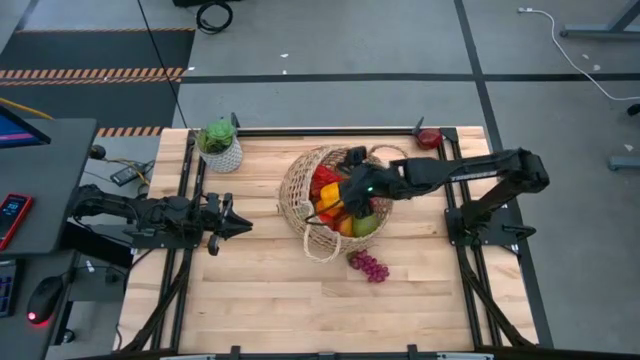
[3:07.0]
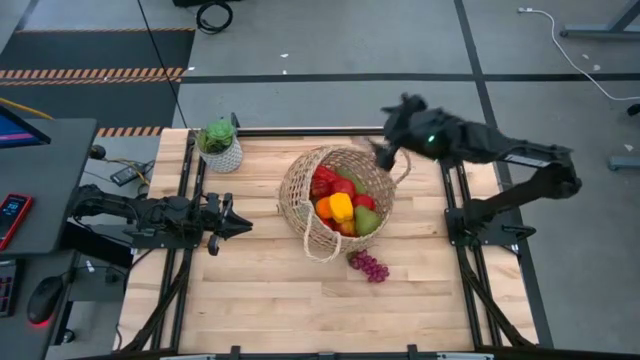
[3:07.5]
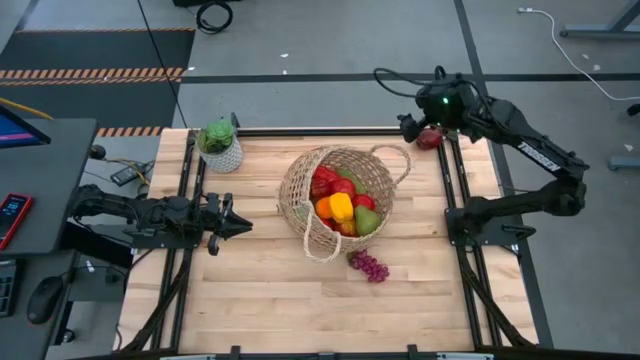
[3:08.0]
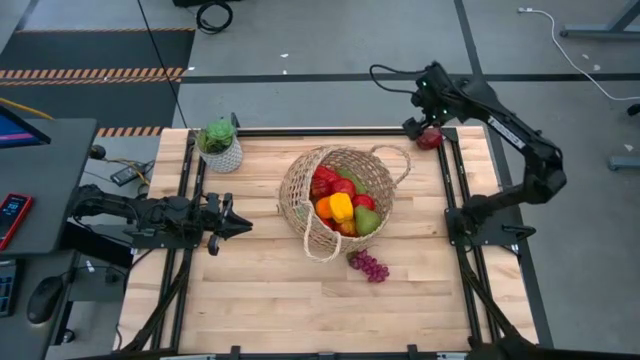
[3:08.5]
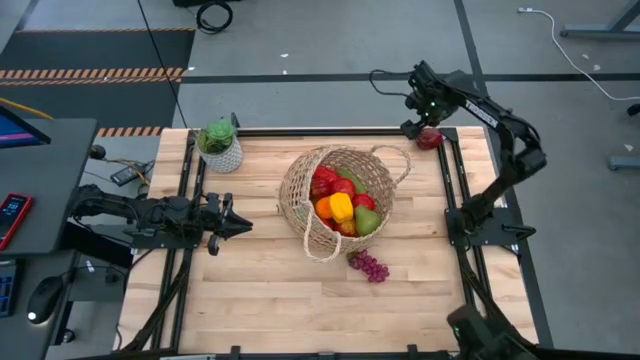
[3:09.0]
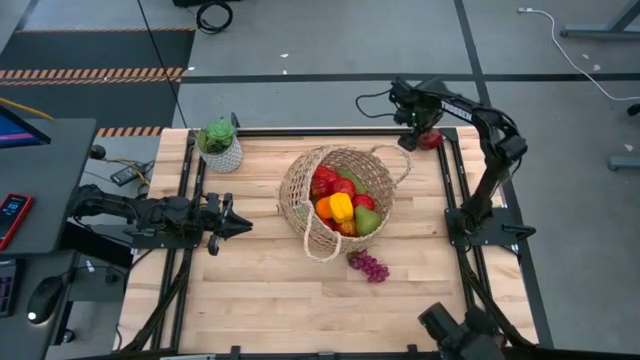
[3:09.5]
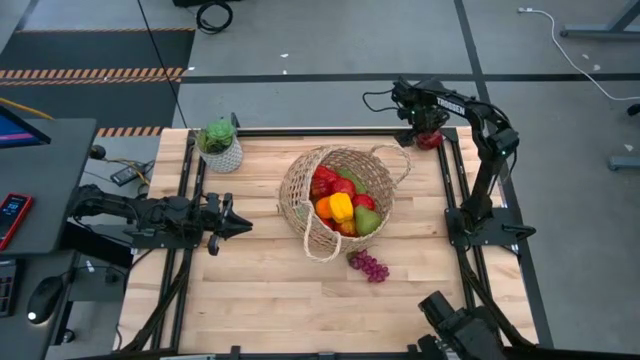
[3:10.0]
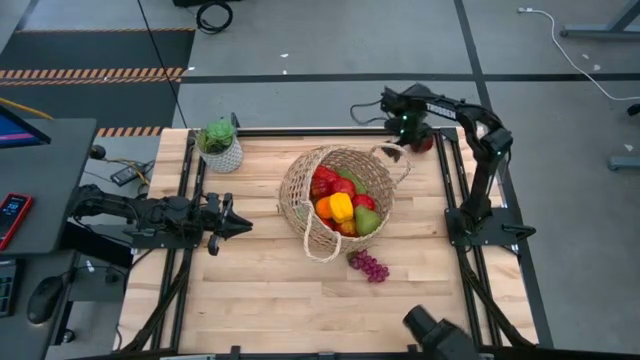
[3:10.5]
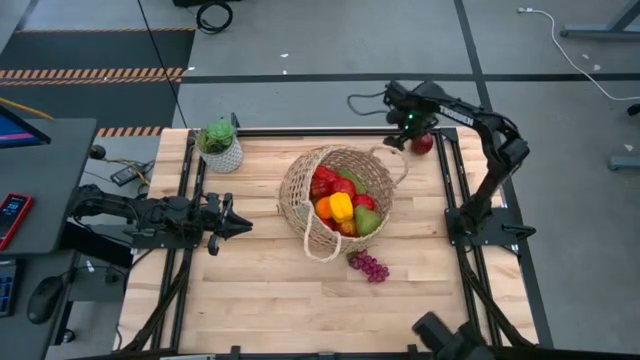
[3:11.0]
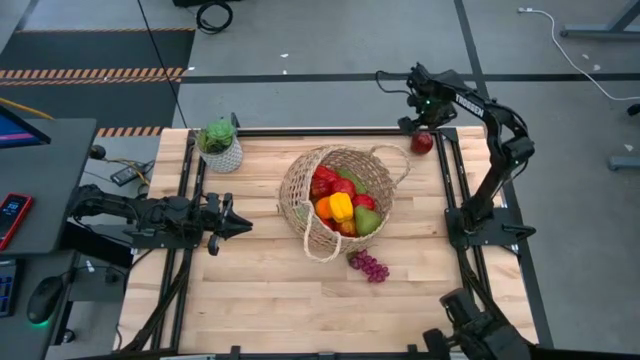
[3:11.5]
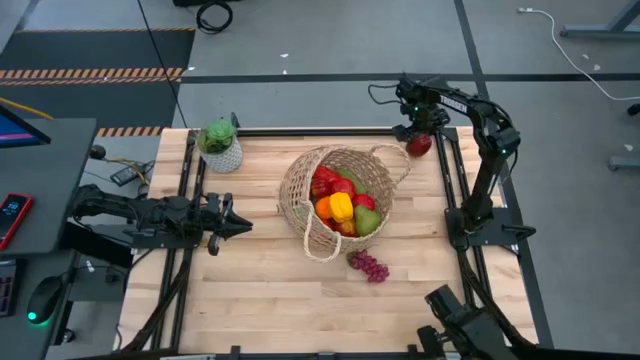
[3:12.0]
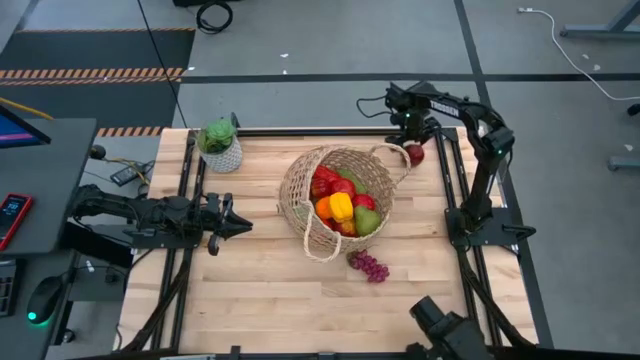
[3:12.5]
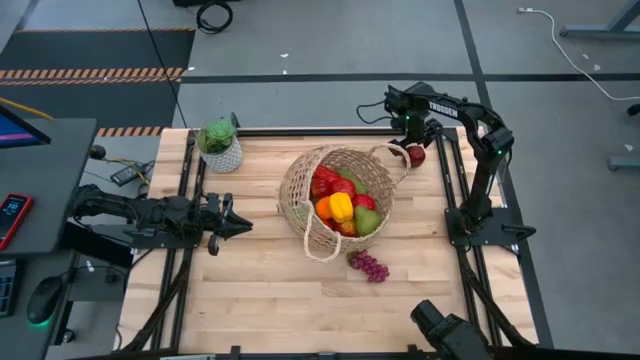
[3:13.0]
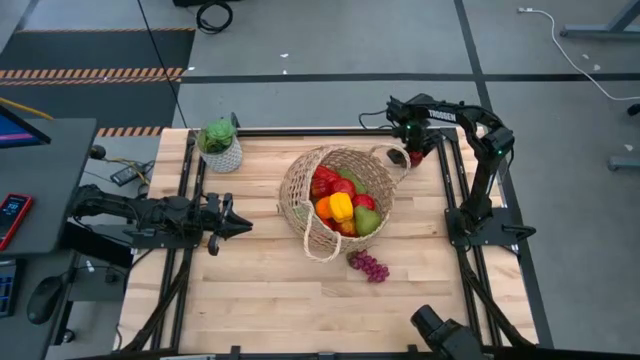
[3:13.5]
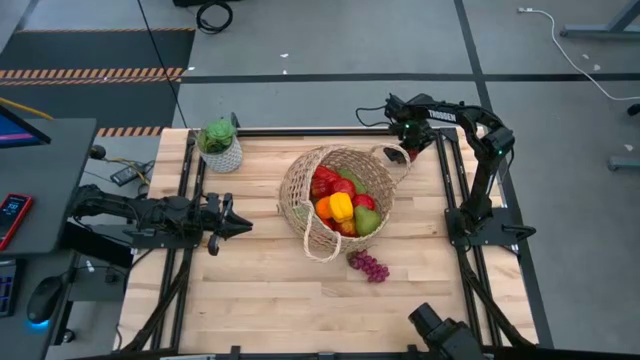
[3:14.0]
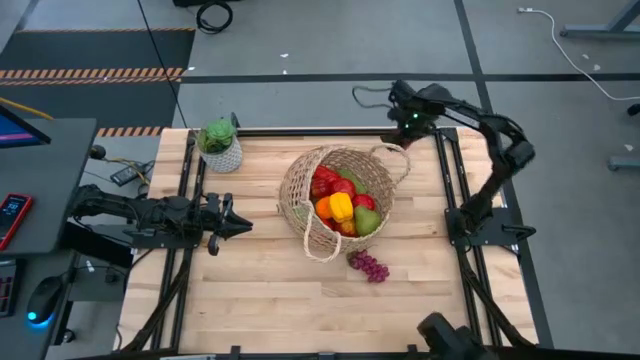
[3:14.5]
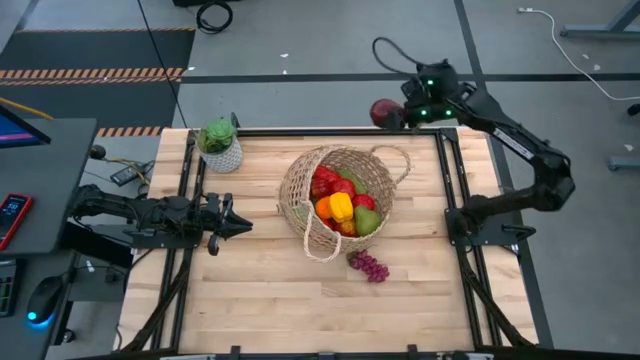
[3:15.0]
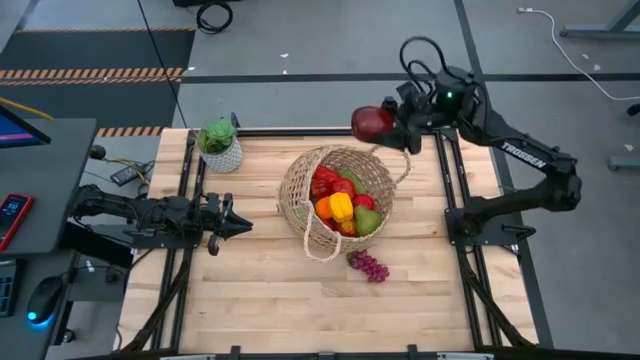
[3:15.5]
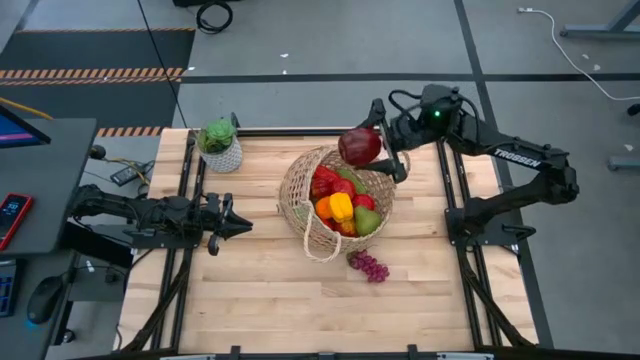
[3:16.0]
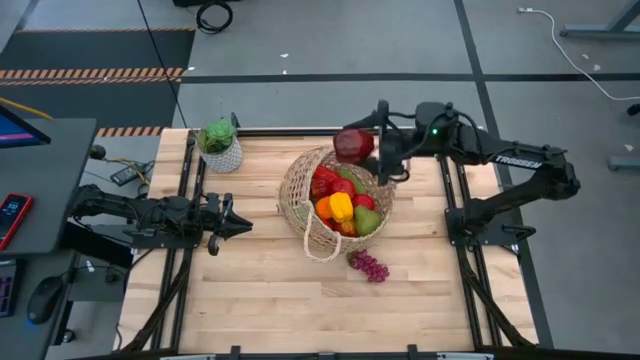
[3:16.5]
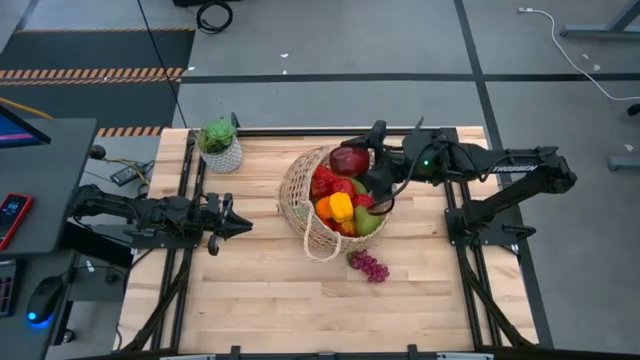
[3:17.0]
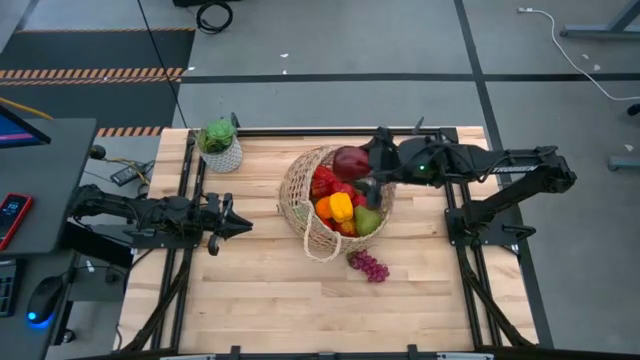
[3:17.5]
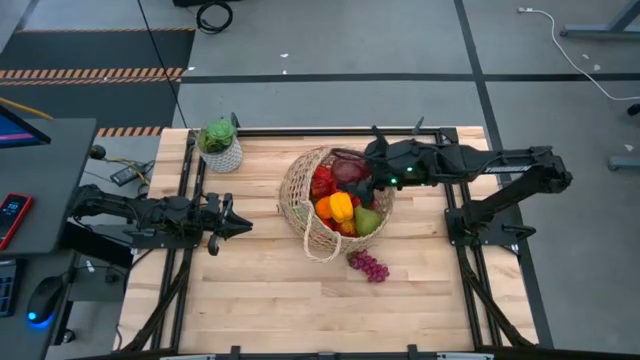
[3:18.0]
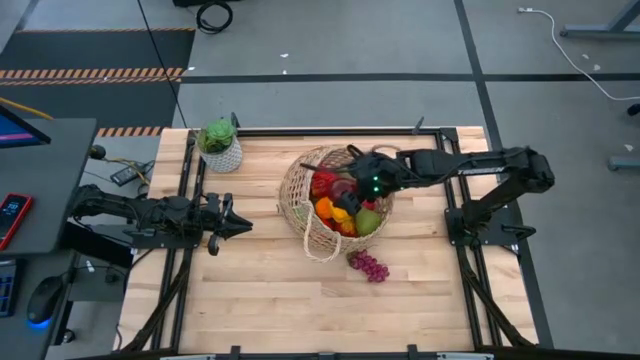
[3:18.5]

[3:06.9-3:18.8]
Task: Build produce basket
Put the red malay apple into the woven basket

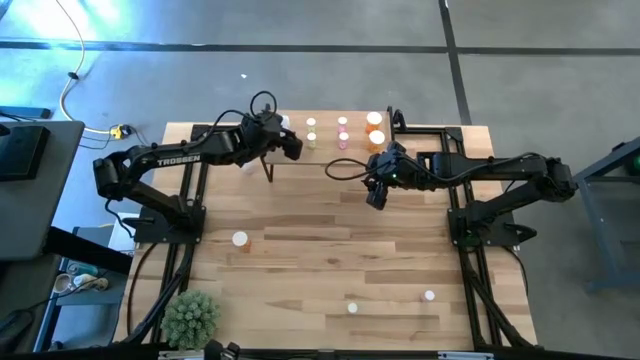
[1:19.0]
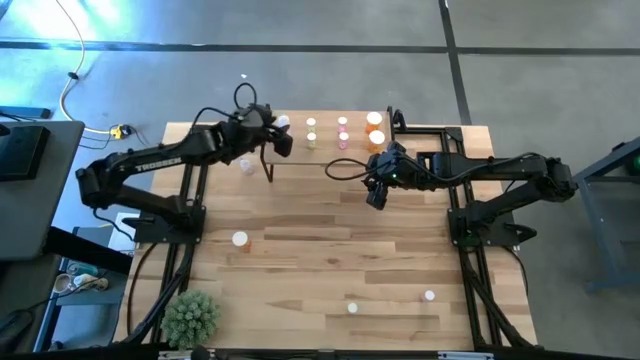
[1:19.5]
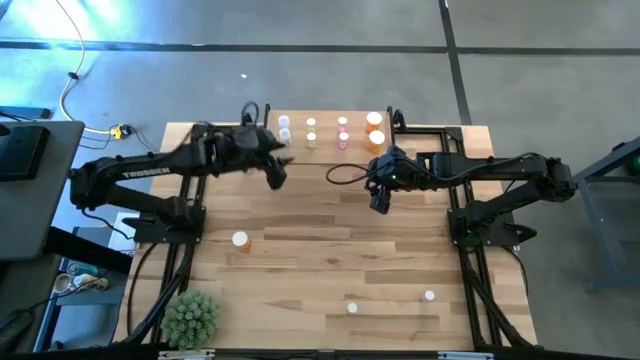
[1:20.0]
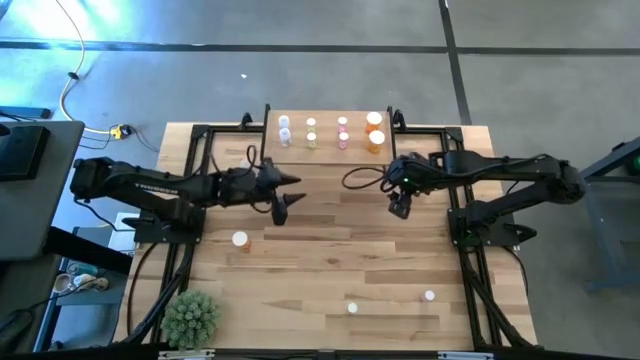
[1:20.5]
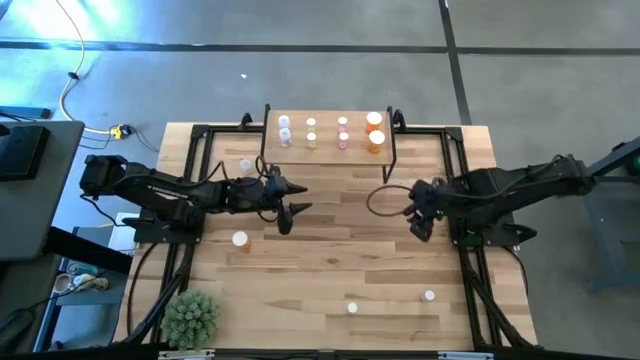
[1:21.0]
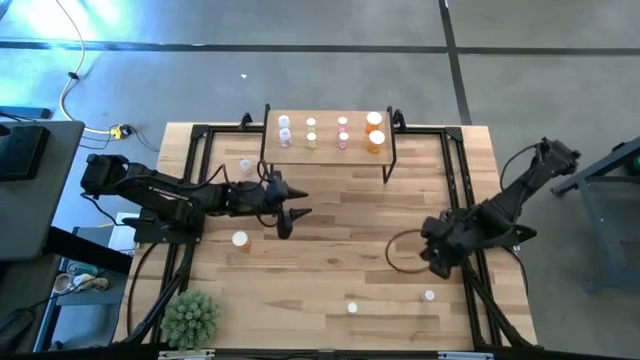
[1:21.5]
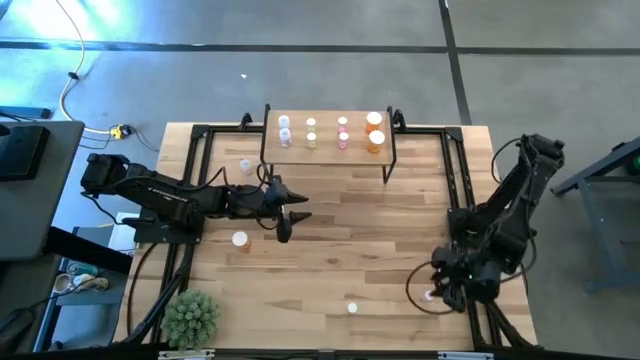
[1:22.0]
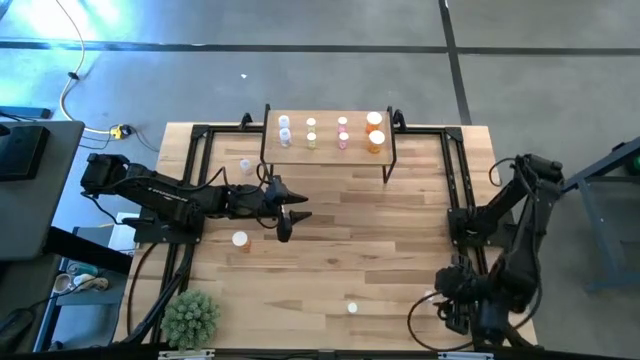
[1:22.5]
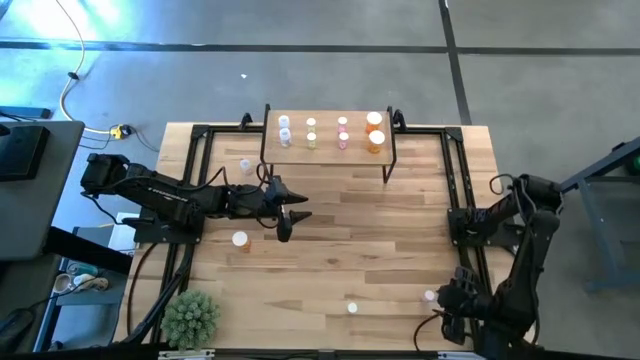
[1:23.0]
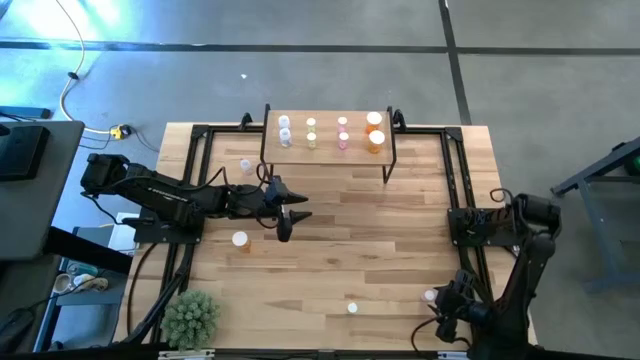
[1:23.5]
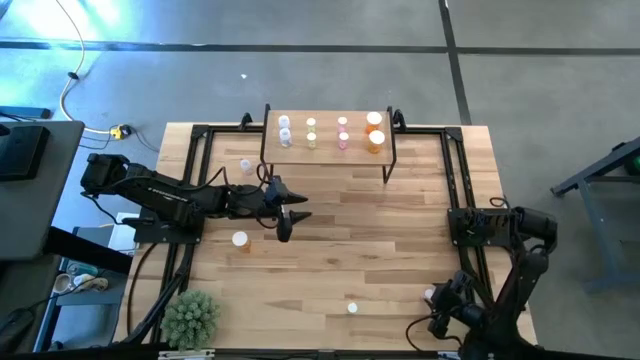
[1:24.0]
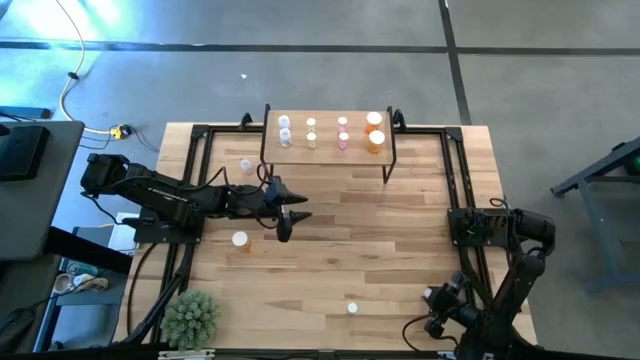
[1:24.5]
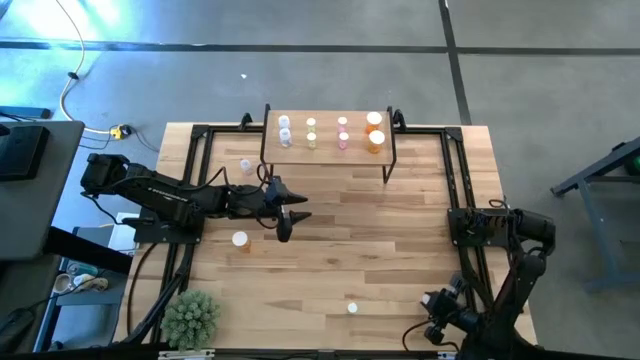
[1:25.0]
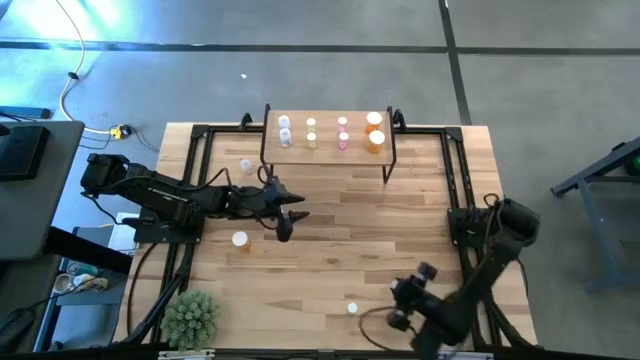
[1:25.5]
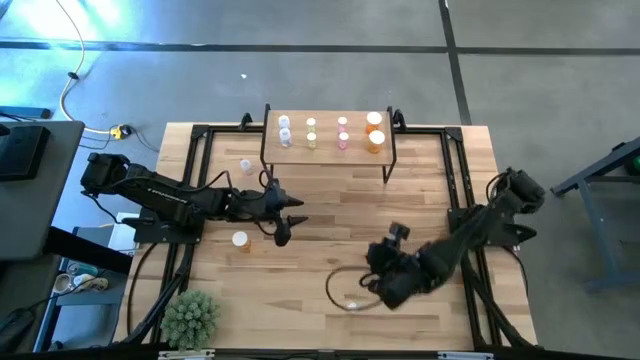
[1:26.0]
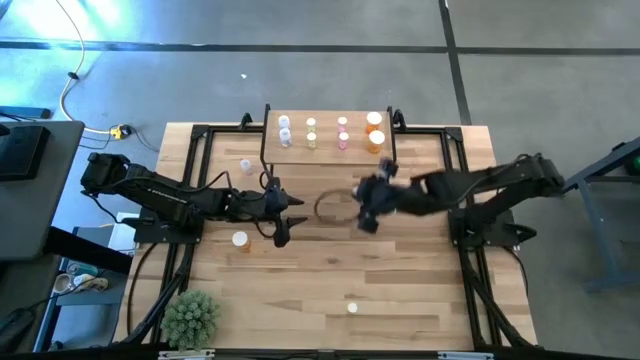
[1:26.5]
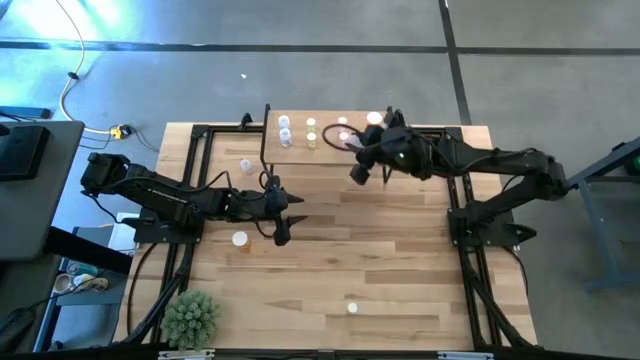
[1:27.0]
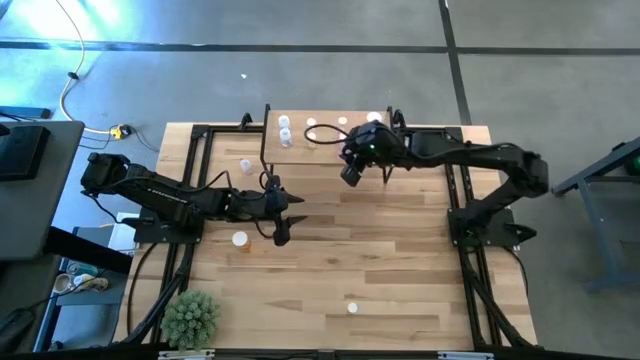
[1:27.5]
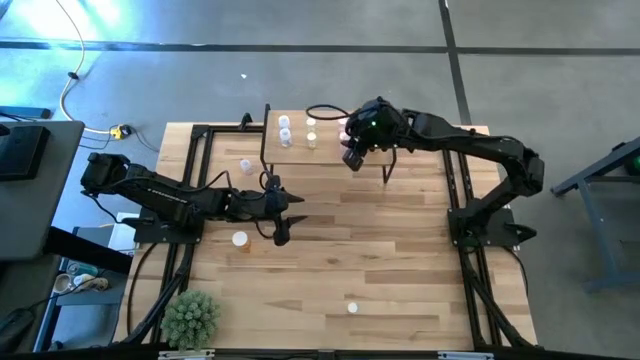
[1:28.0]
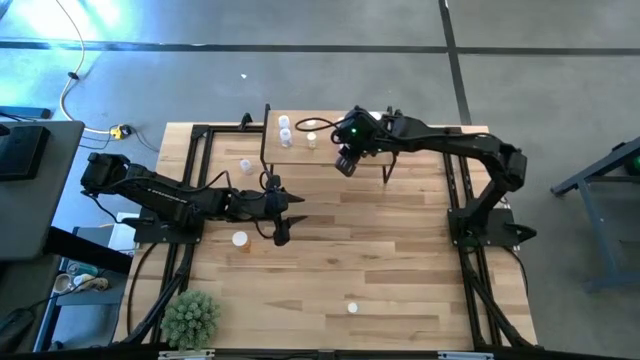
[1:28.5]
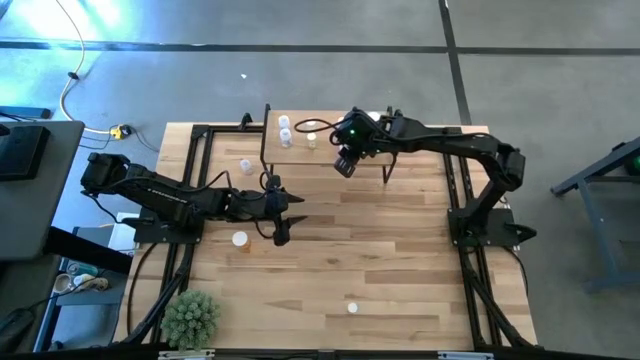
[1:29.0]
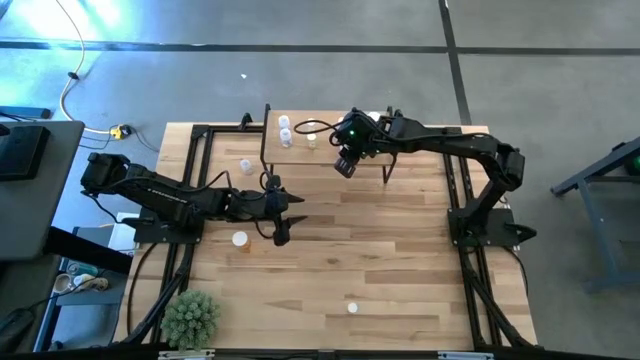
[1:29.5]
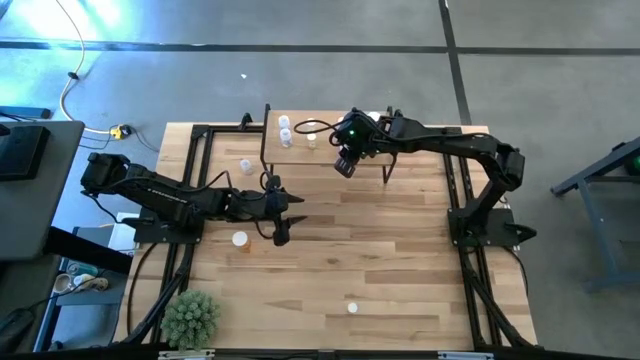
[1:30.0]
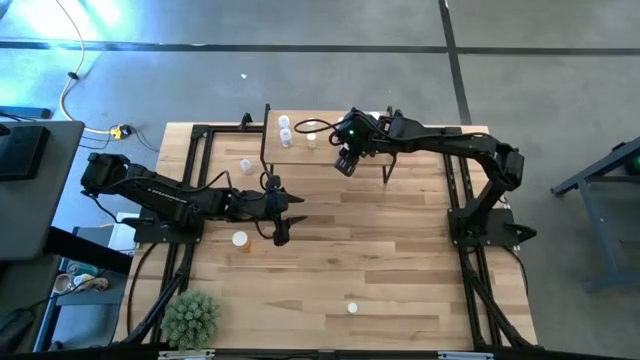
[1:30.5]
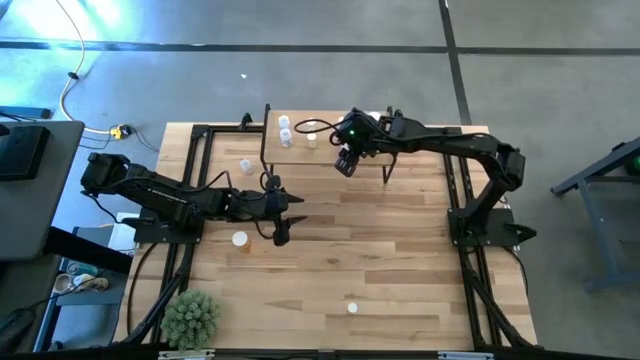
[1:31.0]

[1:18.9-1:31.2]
Task: Pick and place medicine bottles onto shelf by color
Put the pink pill bottle on the shelf aligned with the pink bottle
